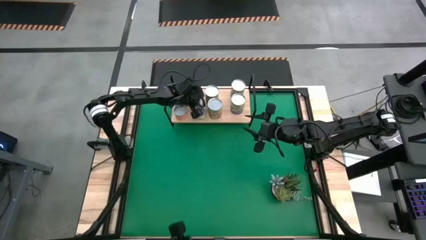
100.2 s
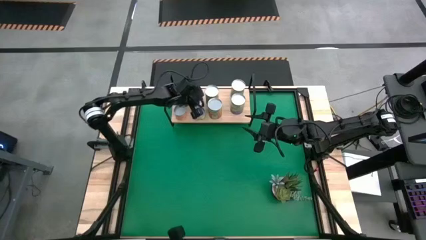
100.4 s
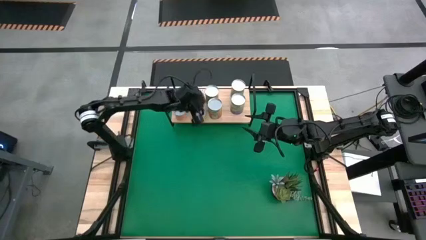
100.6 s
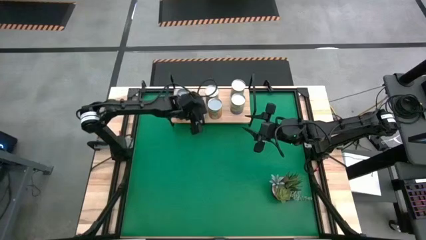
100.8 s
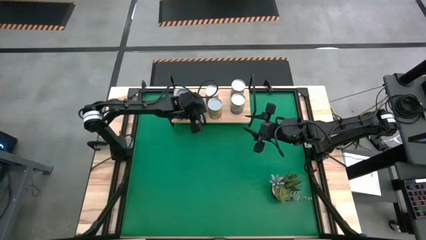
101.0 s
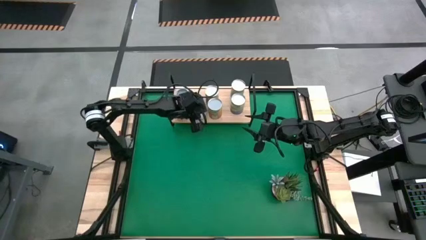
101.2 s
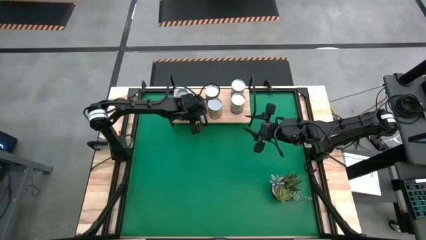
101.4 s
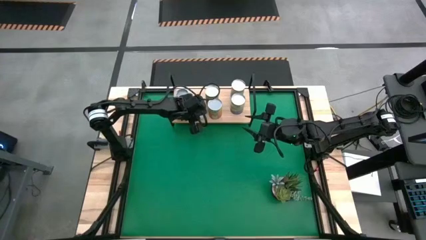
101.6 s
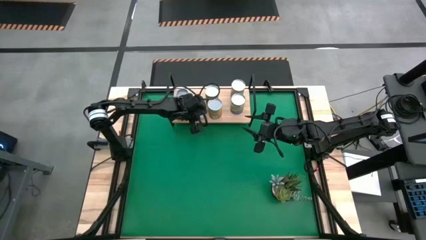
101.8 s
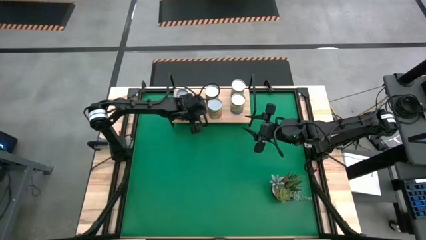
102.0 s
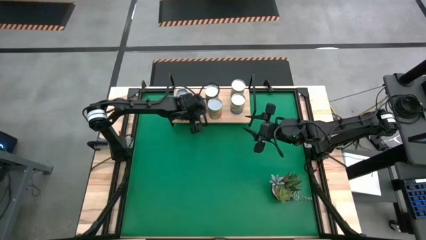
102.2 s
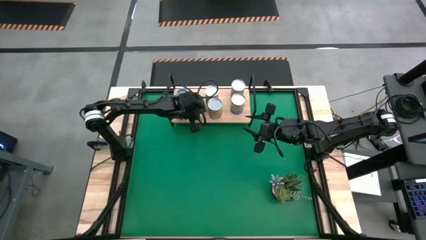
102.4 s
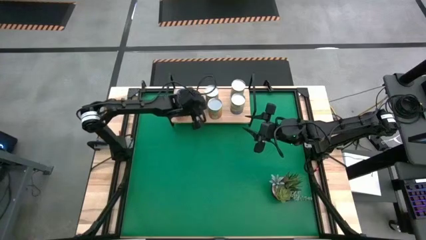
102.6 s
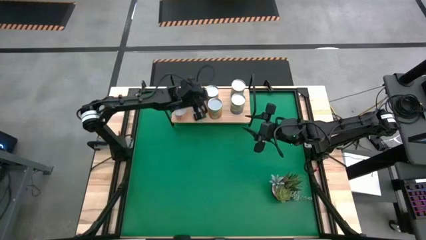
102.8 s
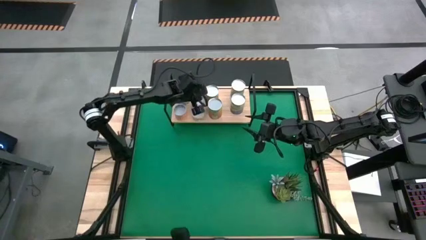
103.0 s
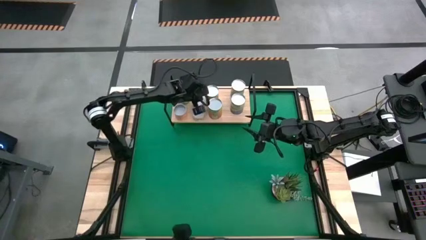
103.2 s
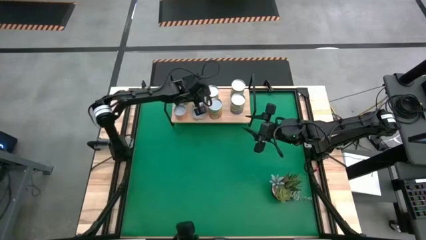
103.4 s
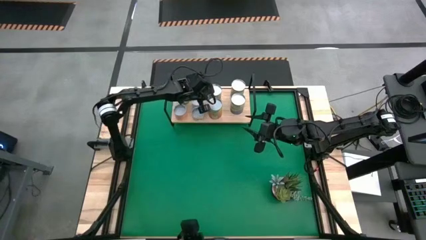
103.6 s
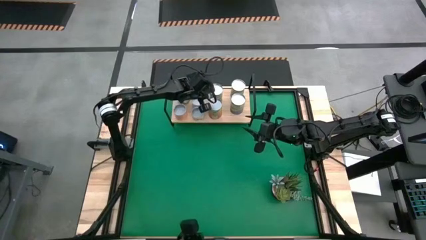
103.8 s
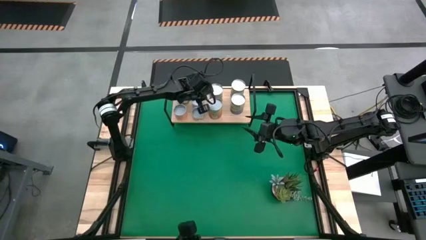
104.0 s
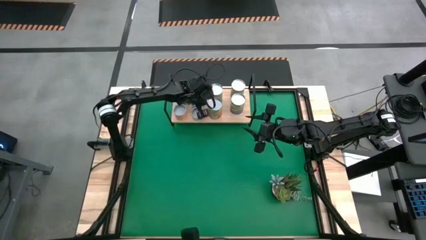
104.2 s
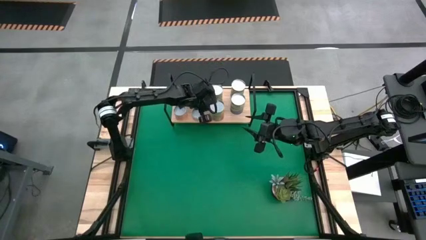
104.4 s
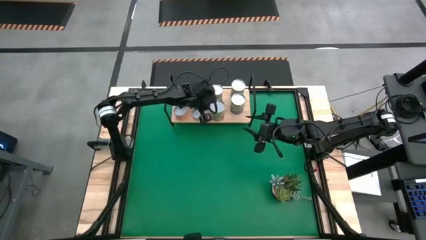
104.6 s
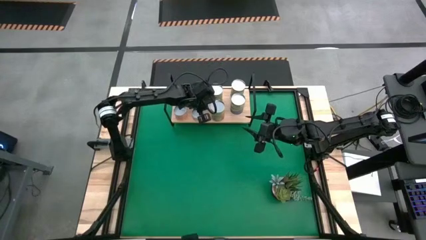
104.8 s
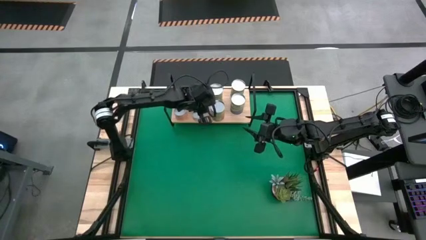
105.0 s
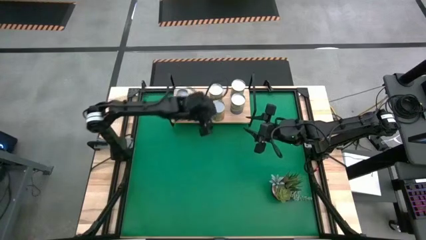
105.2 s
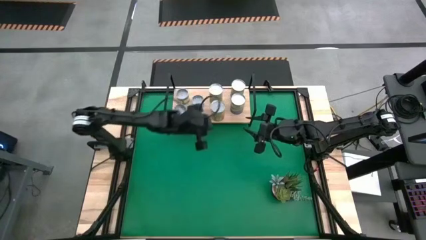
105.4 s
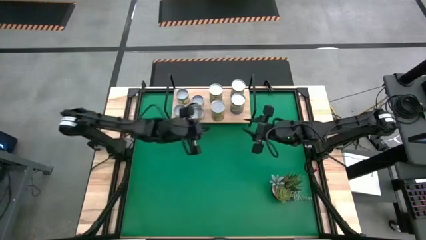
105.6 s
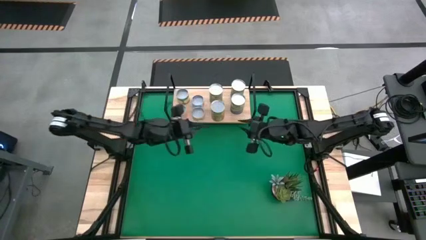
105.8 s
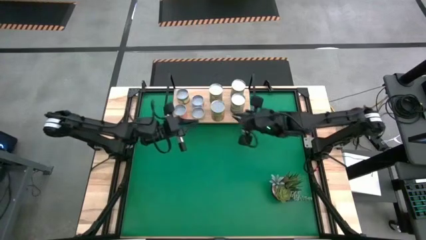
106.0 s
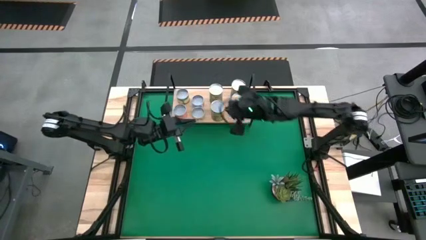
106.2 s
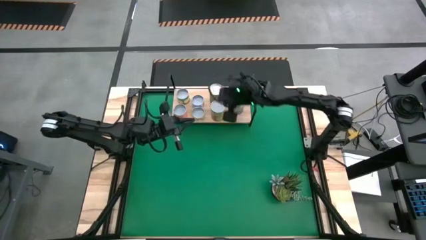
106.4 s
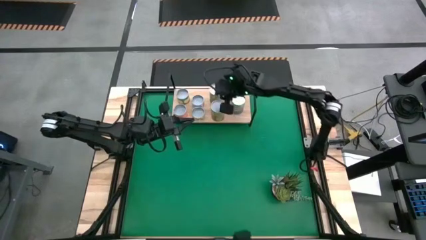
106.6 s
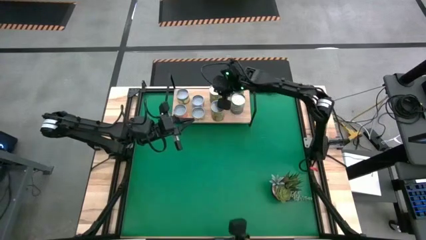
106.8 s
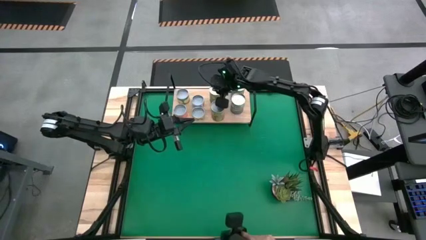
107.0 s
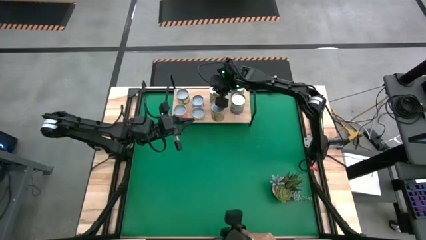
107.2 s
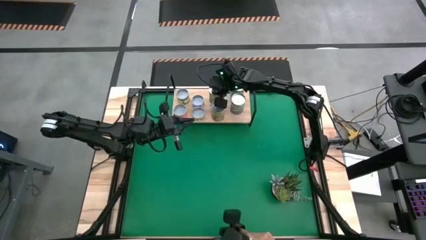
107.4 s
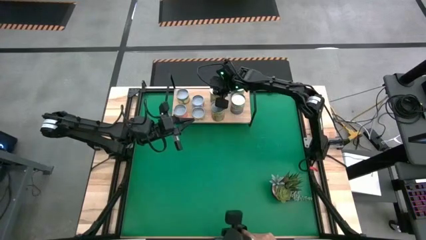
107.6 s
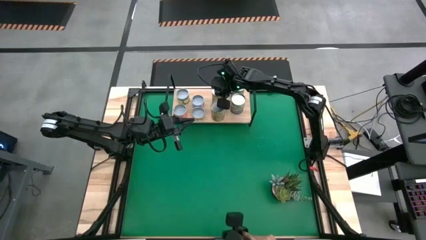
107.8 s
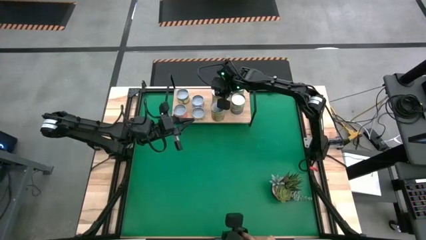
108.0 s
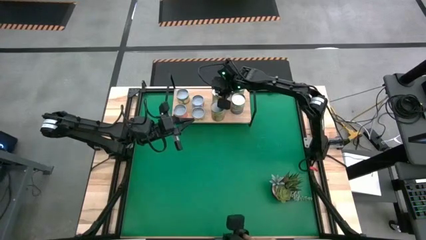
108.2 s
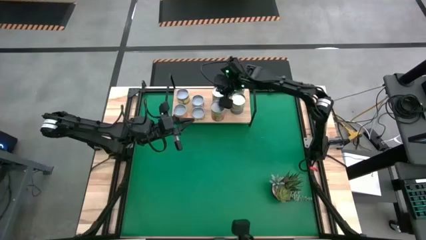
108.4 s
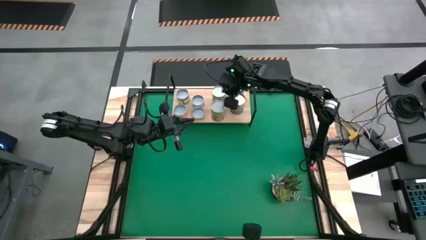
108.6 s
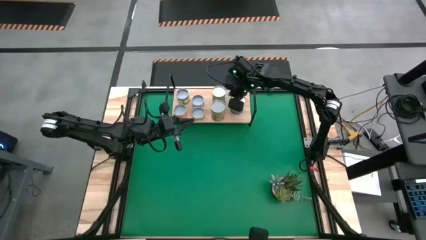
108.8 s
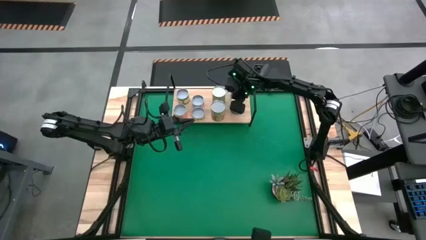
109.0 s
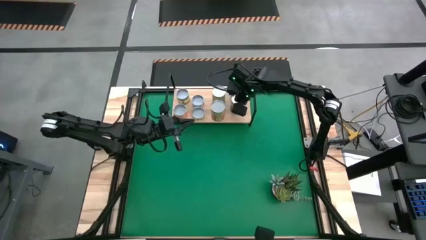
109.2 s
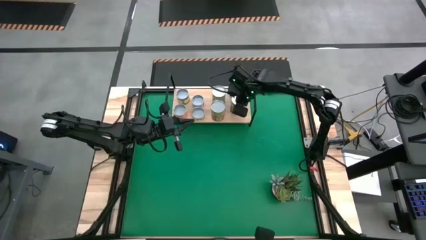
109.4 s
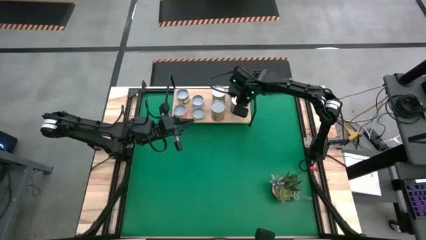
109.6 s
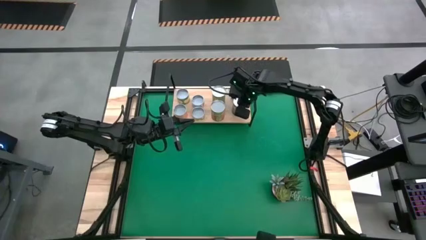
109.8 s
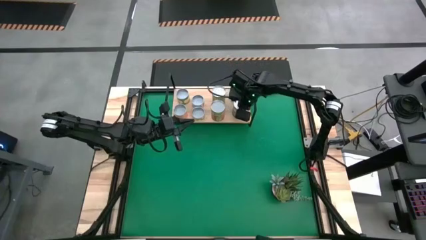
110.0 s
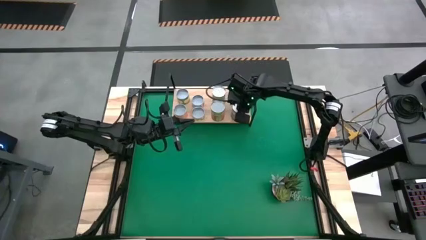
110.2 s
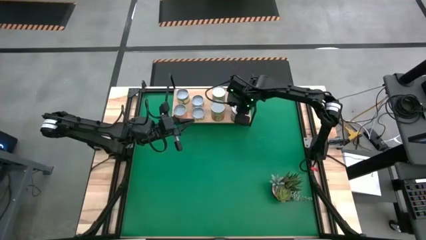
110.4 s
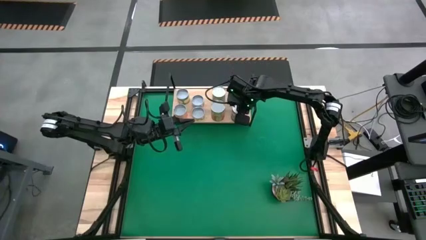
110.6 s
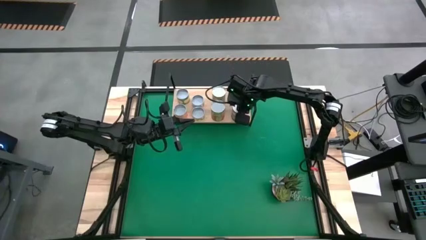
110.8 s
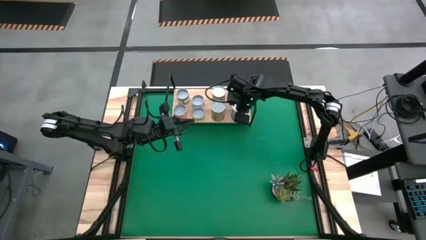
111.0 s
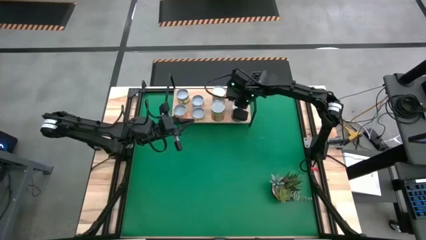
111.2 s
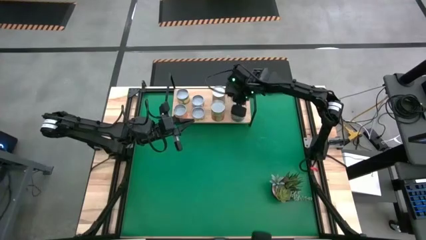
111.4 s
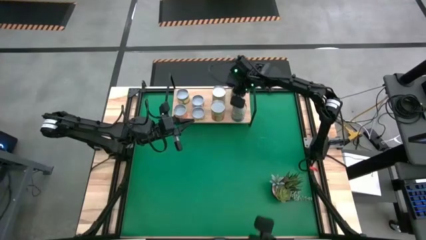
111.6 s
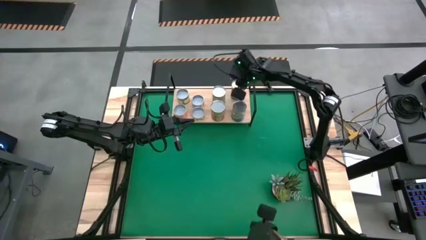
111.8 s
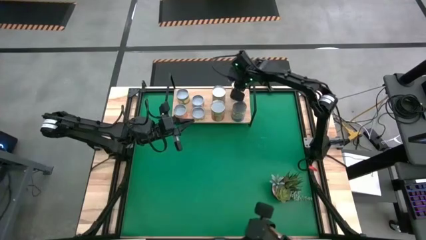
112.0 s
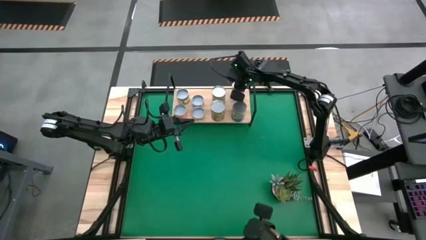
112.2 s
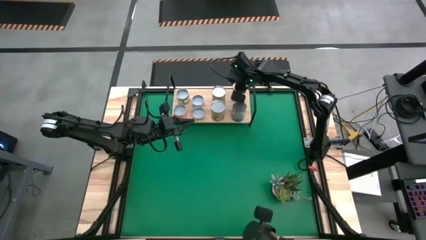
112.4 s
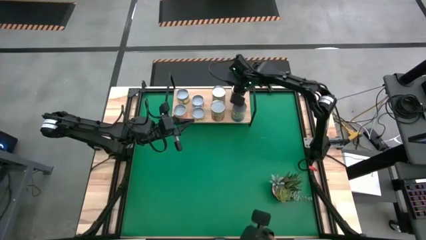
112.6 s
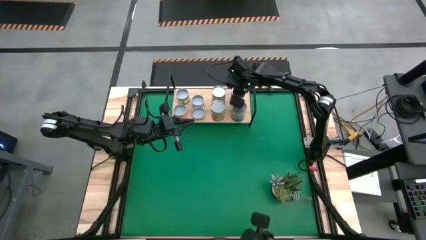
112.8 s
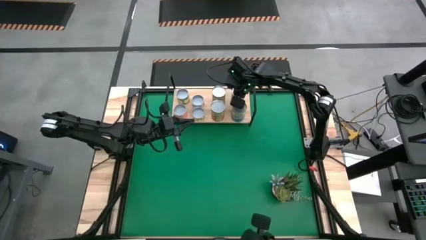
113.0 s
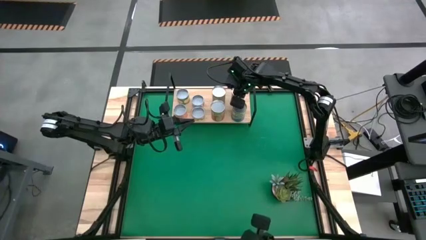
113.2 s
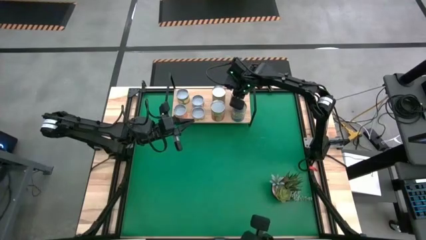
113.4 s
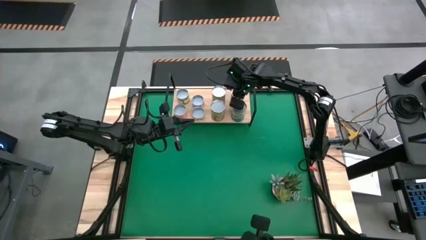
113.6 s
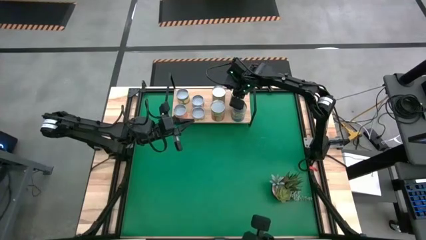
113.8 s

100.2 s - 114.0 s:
Task: Pick and place cans onto a shelf
Adjust the canned goods on the shelf
